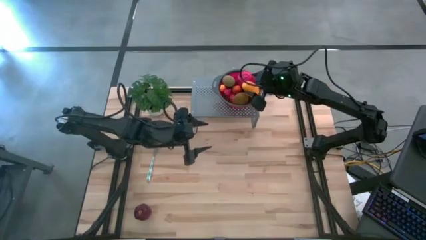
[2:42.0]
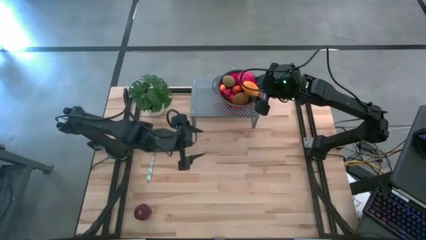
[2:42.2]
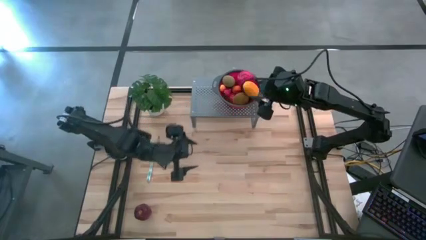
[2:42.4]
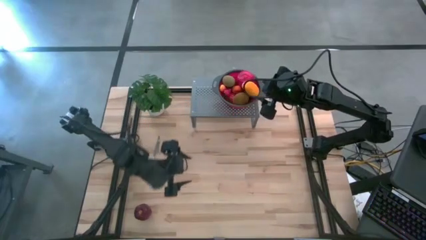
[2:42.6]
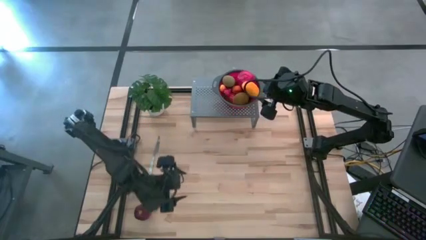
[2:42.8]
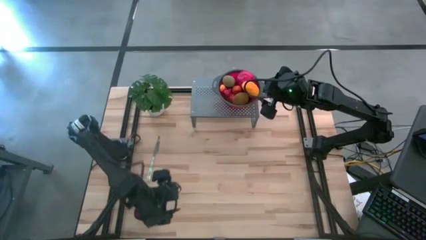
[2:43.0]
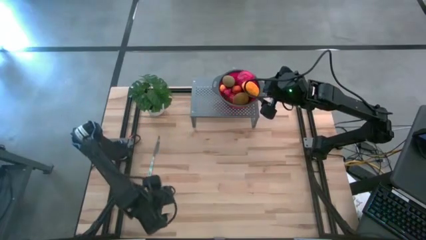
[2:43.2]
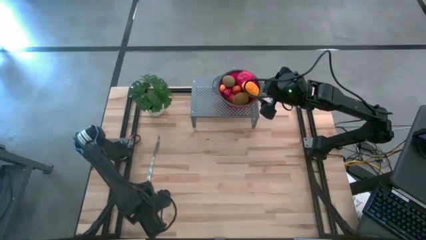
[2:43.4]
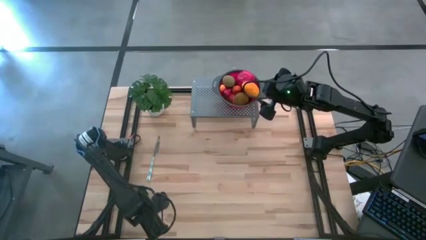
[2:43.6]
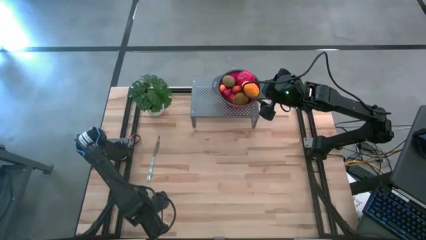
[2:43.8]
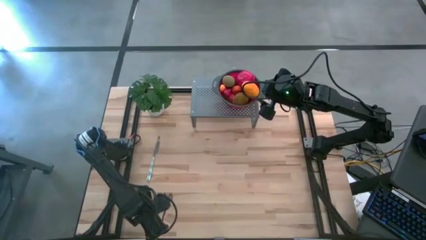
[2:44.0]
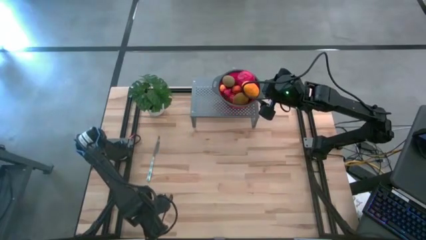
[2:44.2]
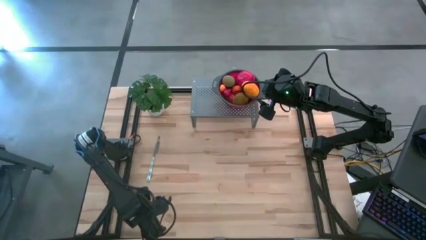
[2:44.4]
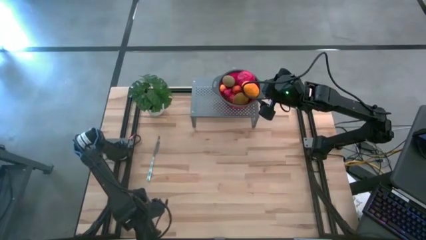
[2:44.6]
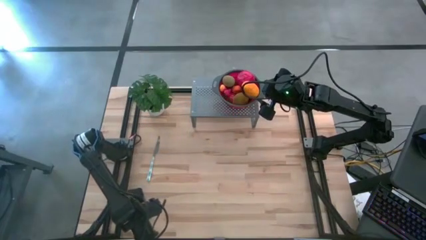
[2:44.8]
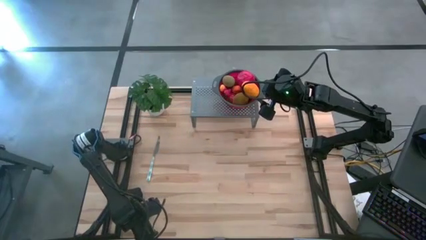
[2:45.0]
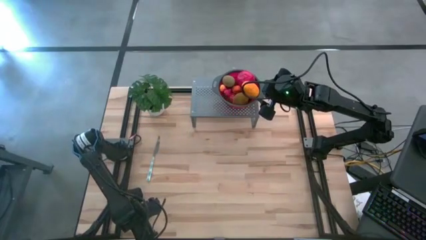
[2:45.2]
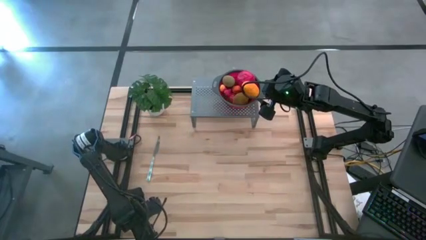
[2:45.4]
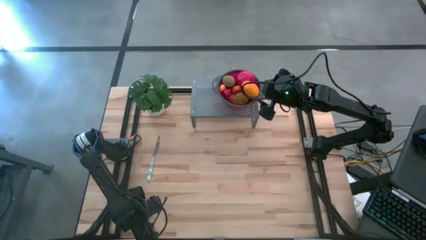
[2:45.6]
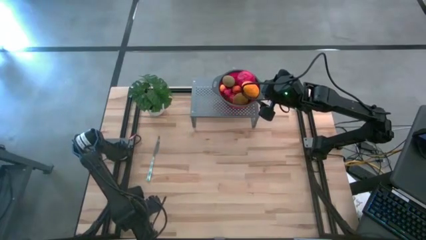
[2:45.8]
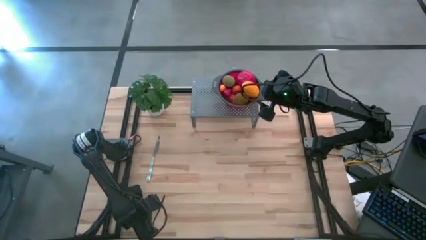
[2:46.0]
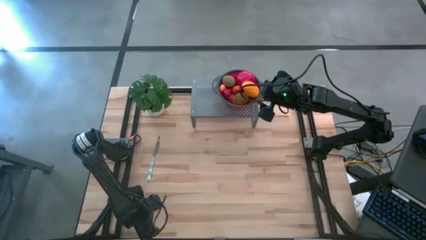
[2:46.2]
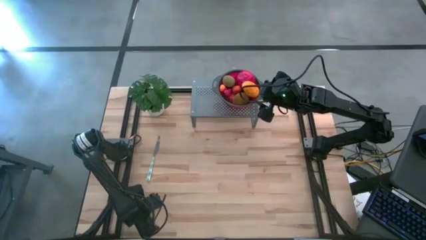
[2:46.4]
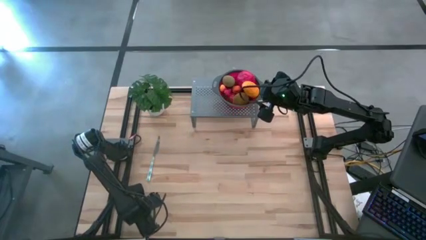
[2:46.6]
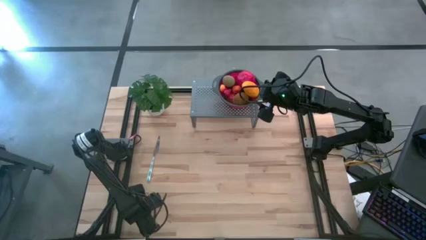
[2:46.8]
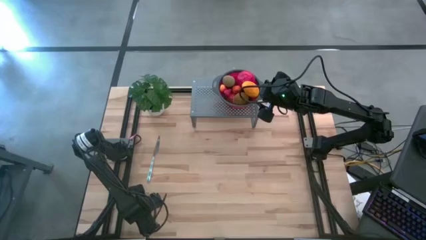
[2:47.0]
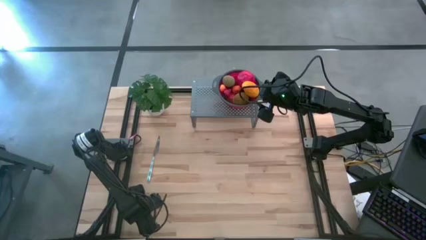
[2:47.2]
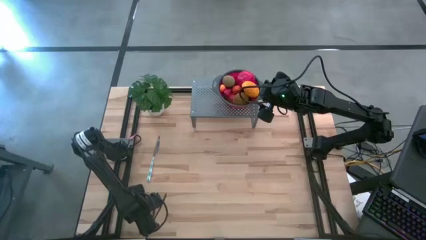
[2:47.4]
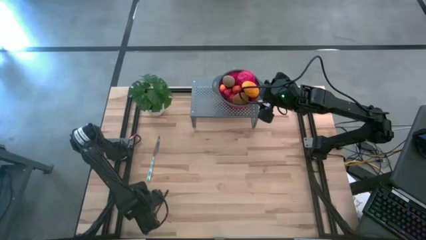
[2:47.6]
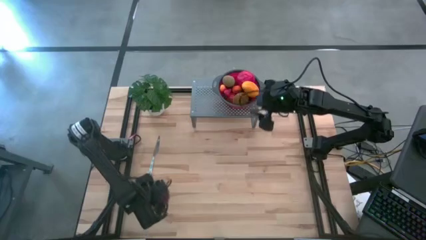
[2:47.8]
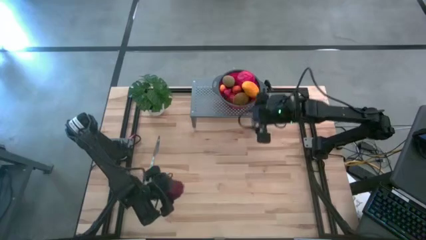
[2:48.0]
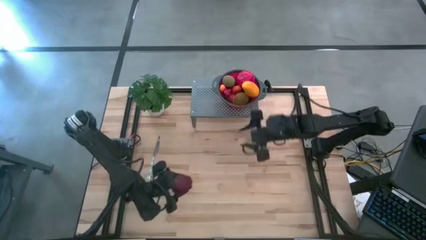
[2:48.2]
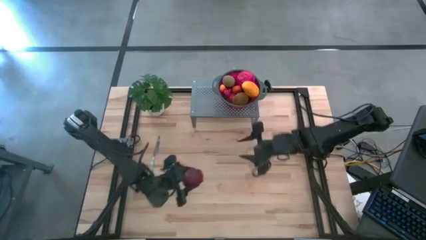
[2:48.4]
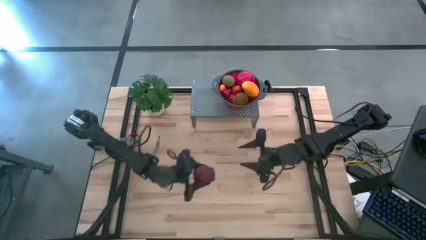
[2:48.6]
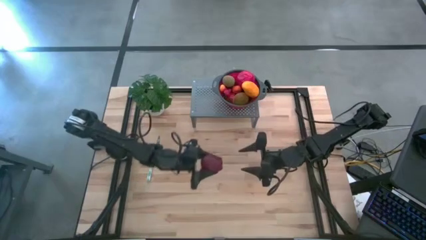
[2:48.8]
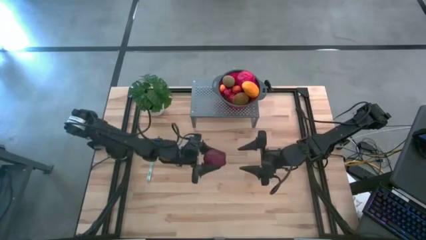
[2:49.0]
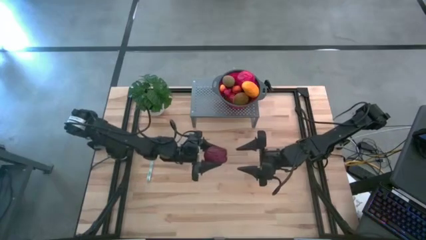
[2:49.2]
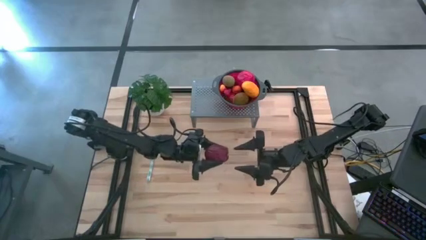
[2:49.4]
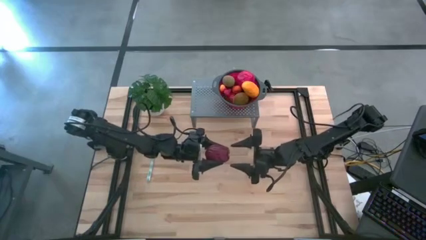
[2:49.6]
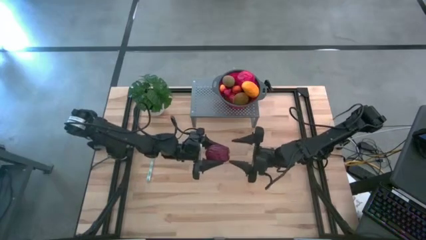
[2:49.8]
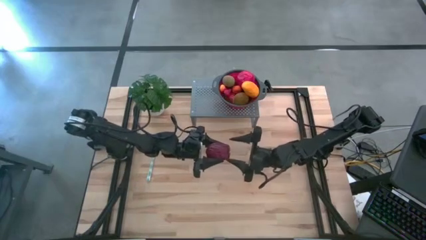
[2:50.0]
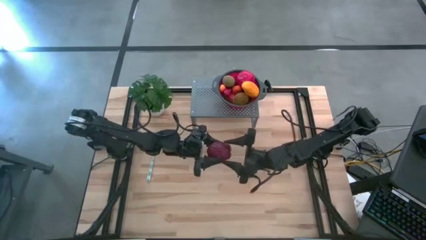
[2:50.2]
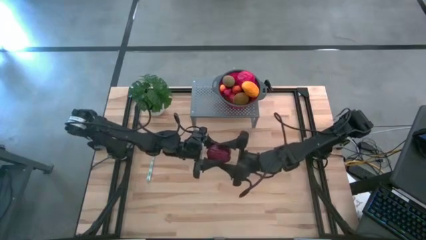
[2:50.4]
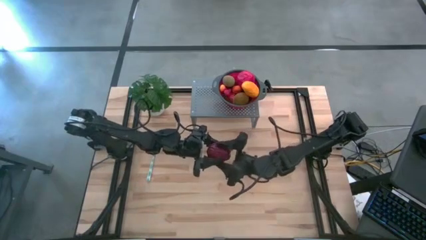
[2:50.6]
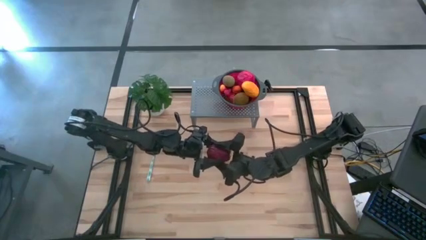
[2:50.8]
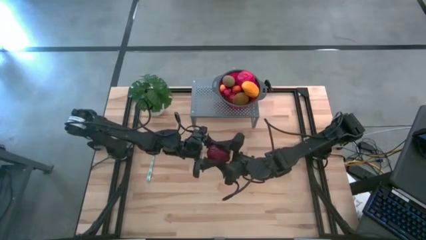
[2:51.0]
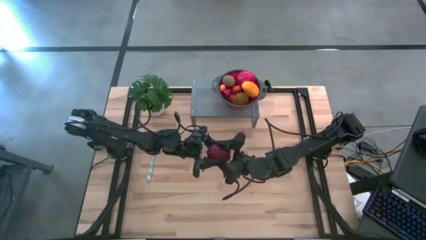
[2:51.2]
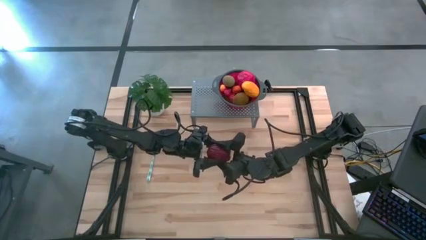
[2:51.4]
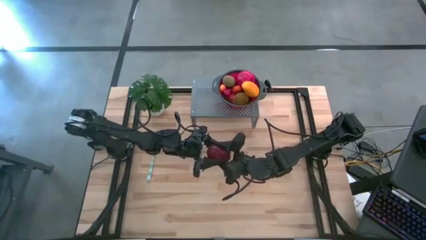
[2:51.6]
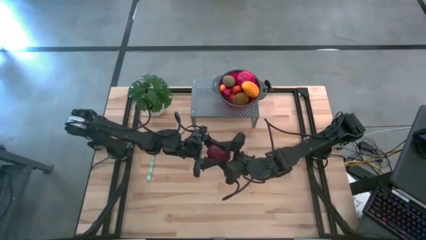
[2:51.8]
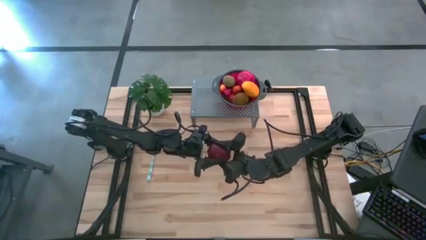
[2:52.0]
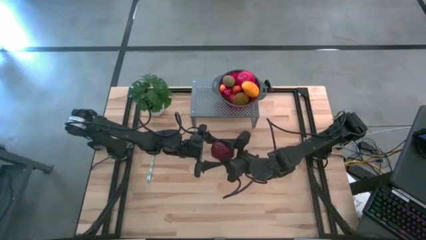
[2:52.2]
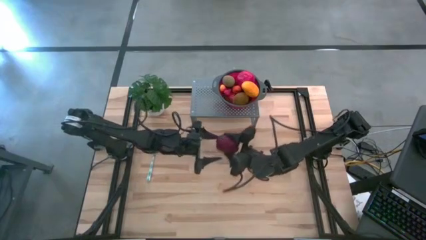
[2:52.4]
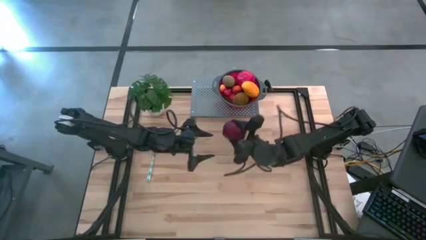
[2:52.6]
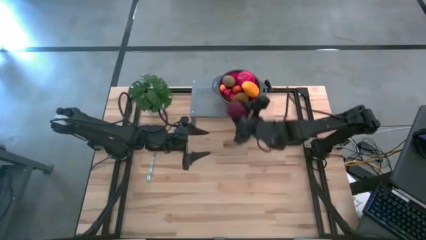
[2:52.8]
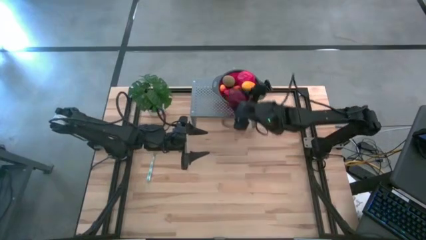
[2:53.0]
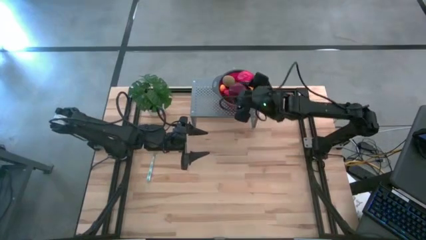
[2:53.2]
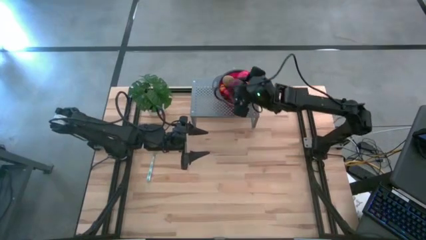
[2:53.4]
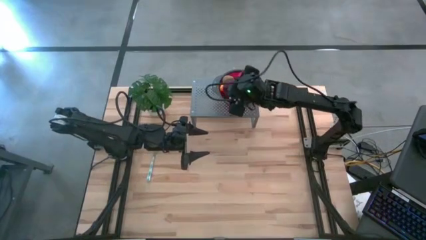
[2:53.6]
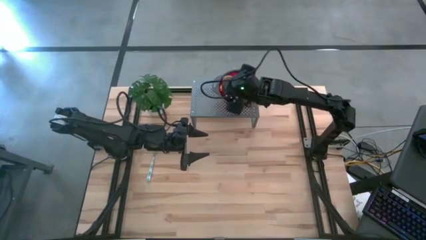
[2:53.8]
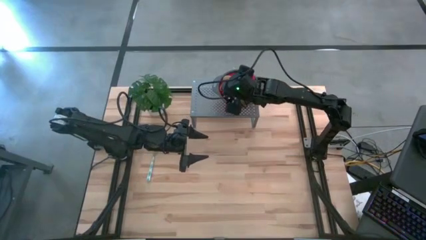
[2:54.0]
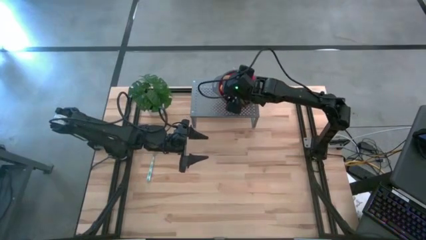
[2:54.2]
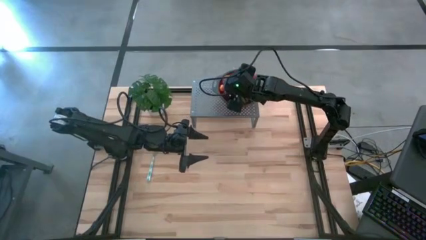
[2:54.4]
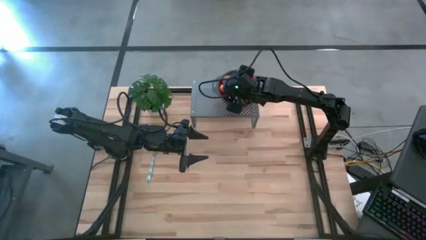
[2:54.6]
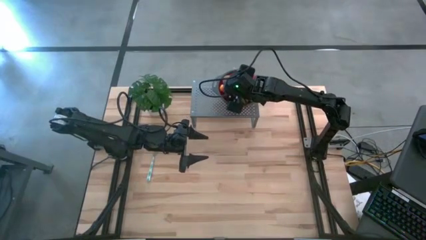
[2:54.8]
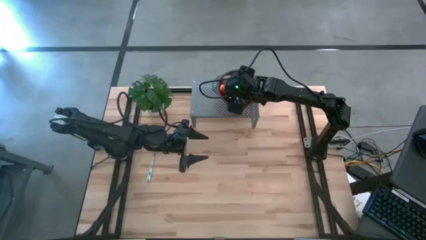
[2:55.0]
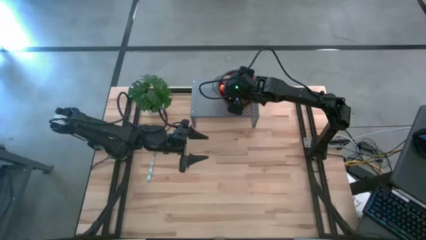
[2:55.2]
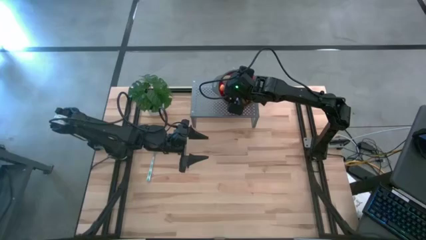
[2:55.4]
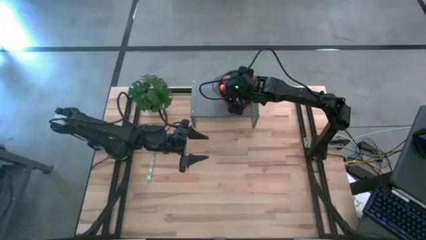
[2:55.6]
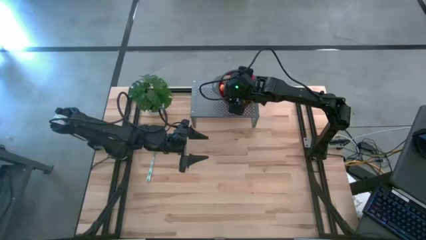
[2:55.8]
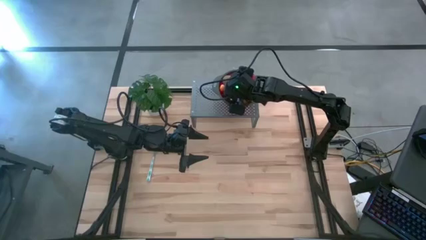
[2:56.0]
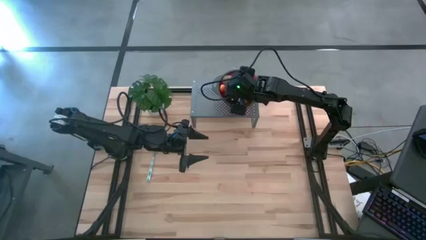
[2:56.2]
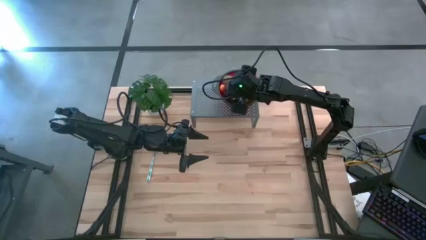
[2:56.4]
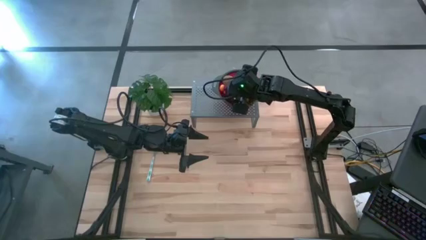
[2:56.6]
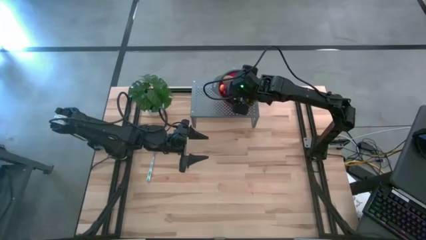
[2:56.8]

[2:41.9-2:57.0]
Task: Pick & Place Fruit
Put the apple into the strainer bowl on the shelf
